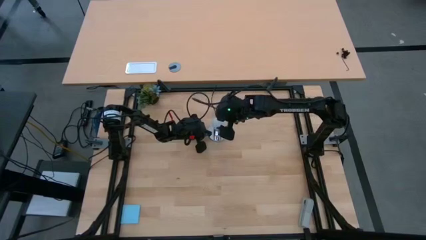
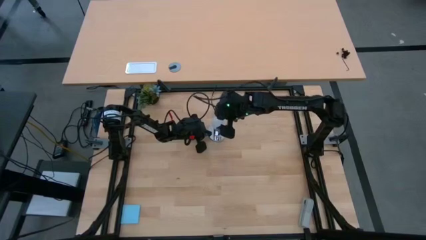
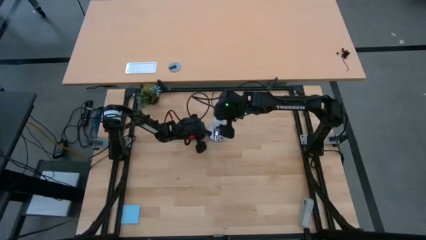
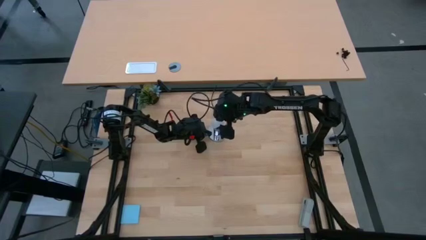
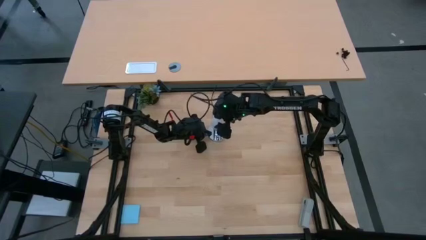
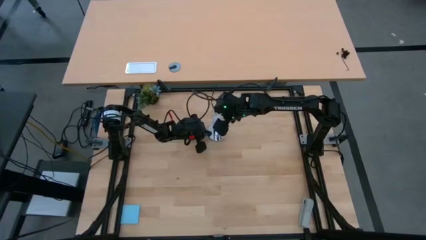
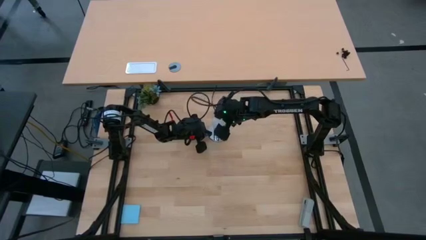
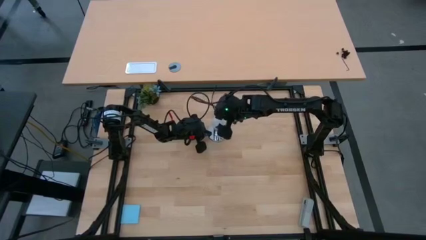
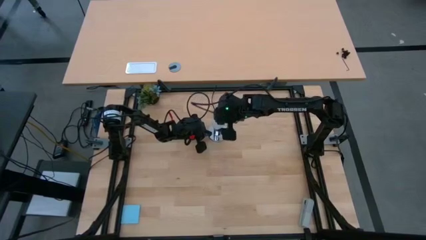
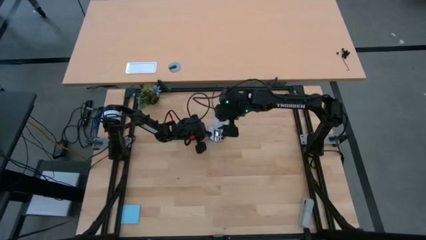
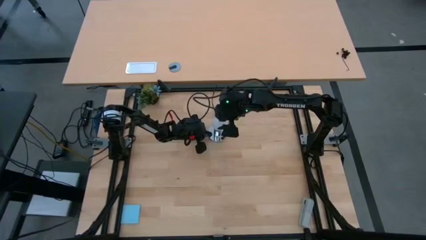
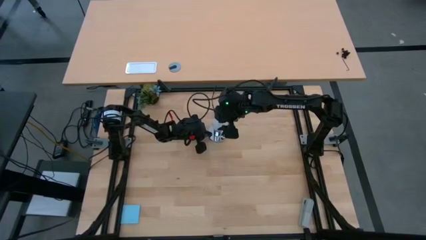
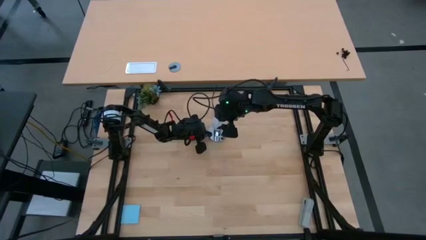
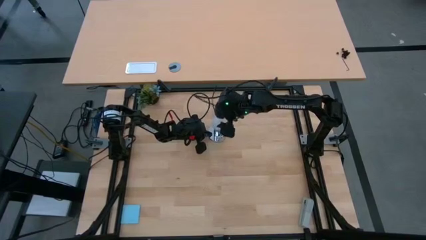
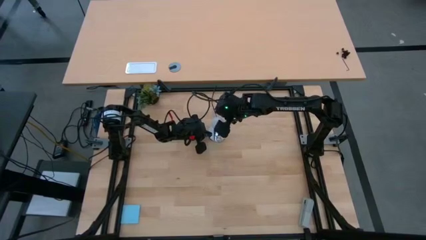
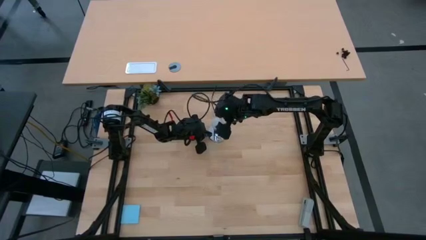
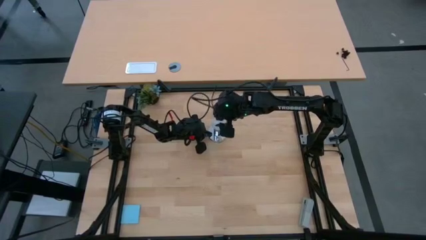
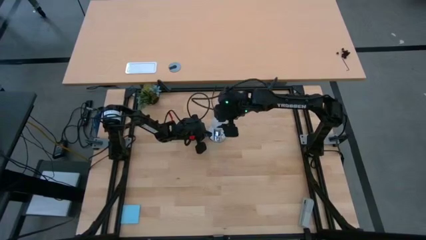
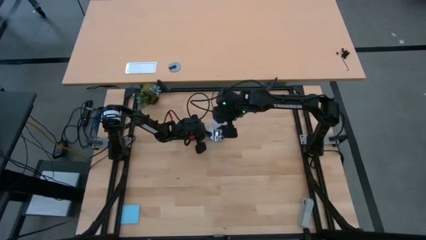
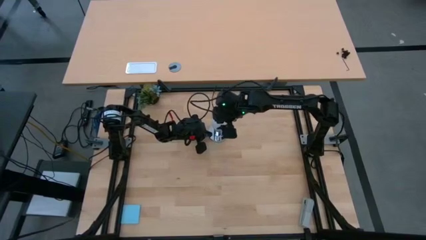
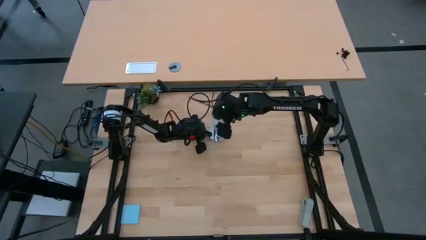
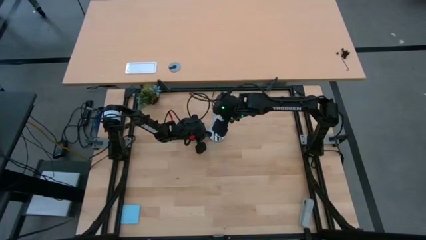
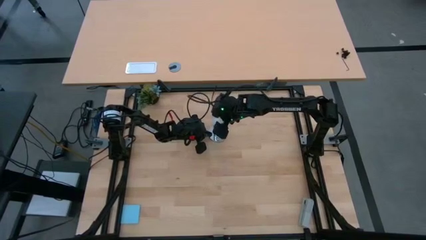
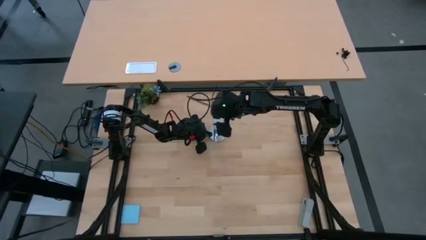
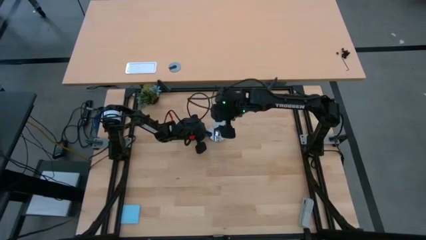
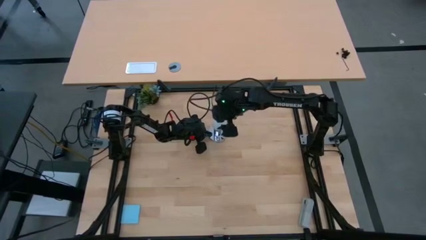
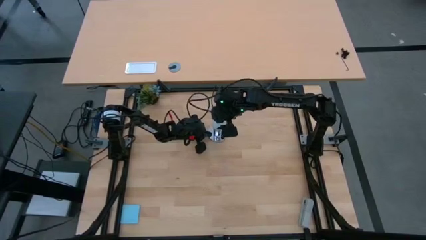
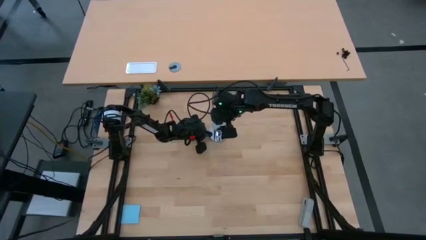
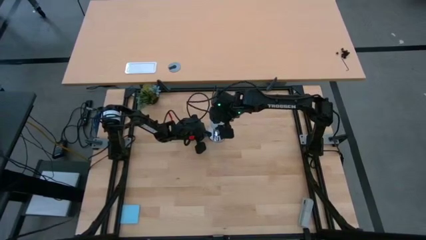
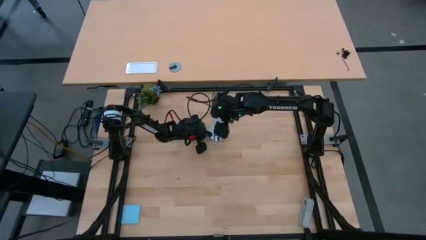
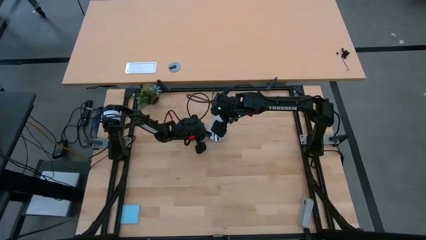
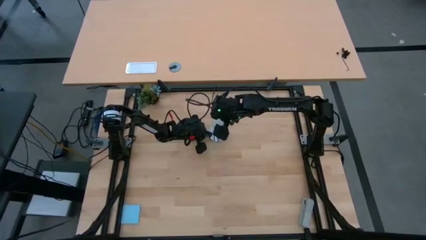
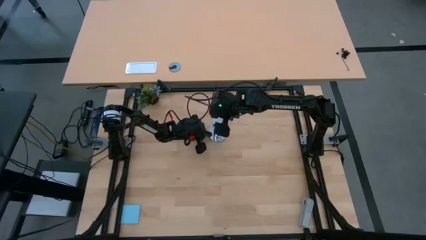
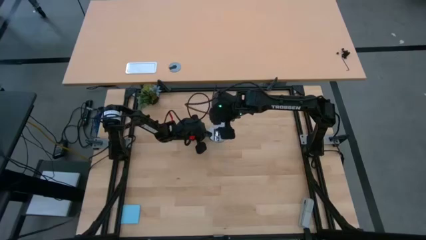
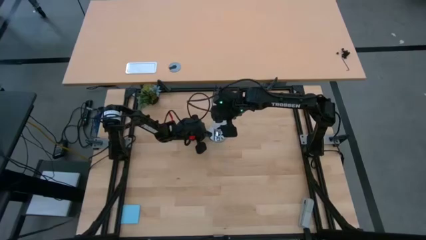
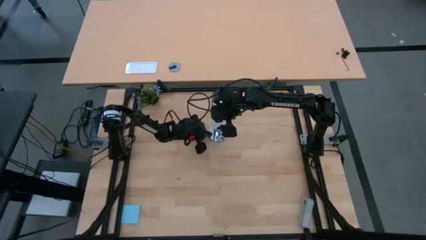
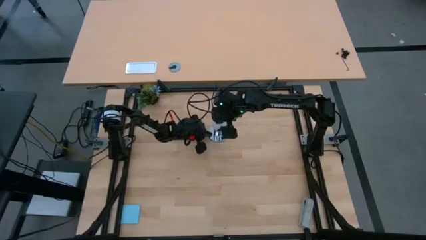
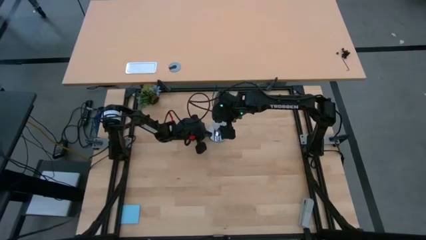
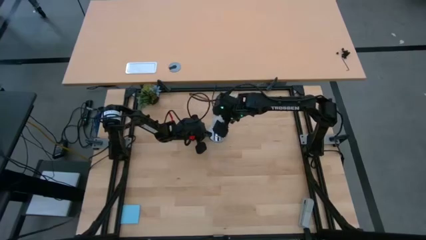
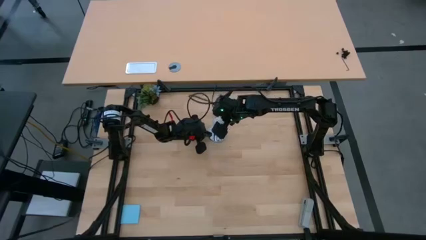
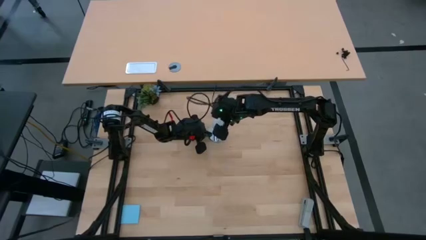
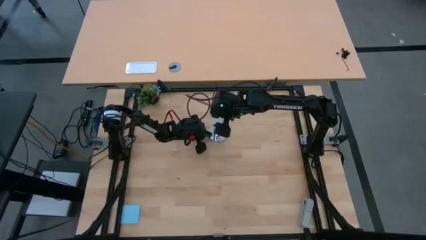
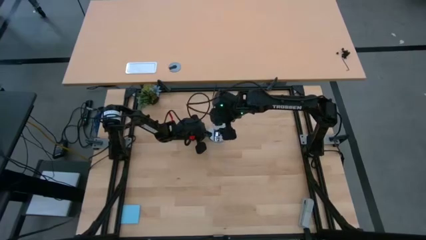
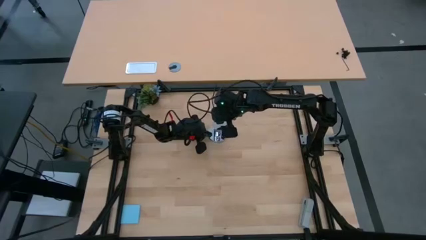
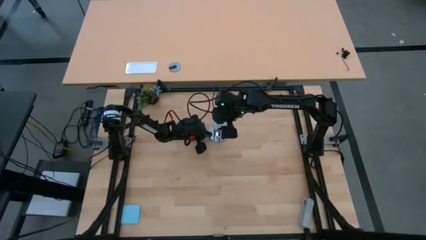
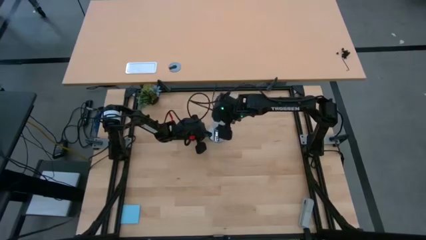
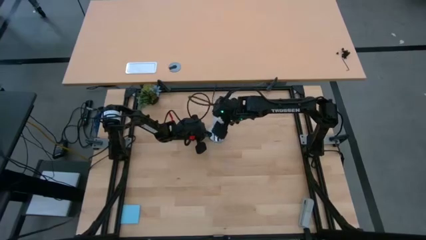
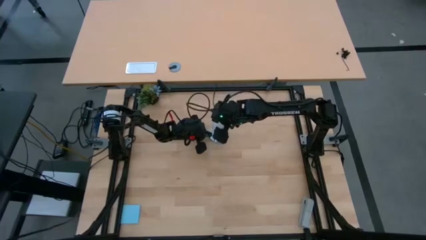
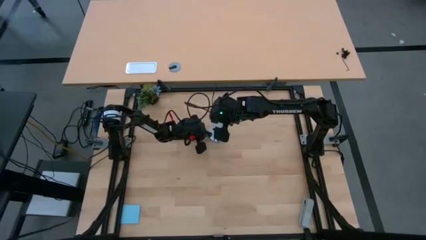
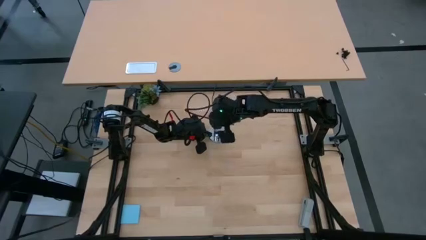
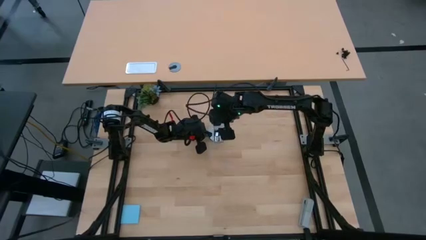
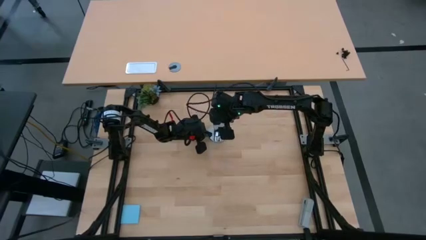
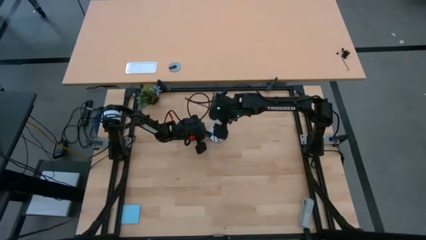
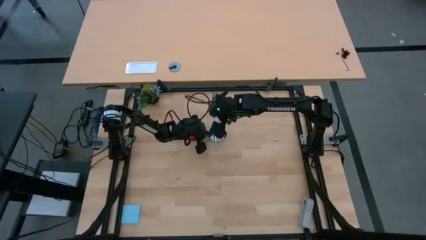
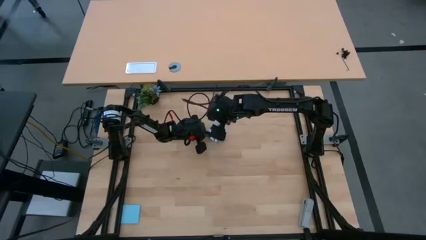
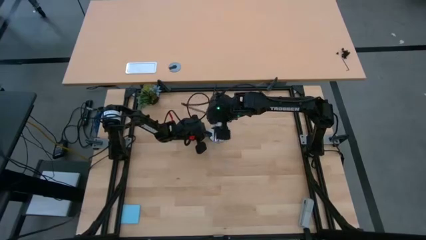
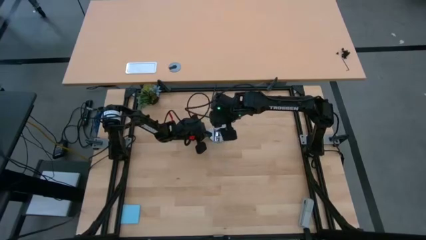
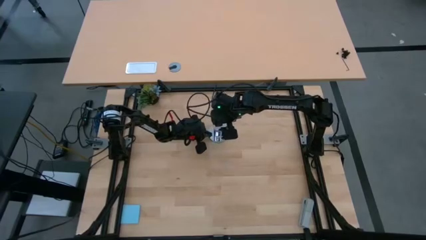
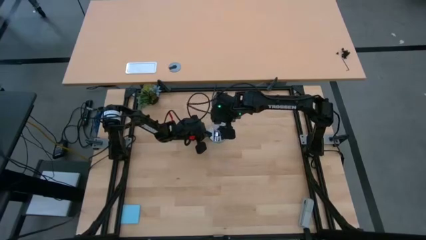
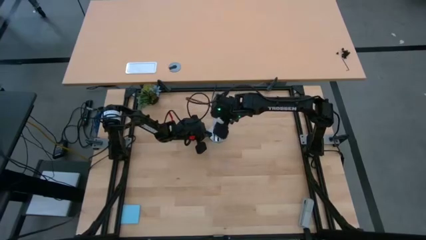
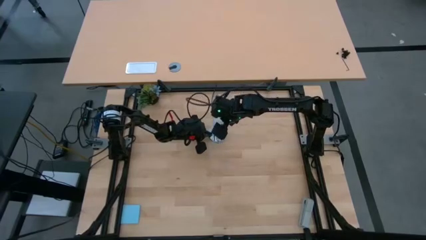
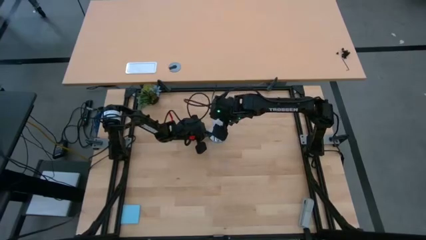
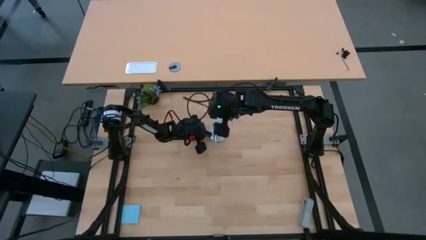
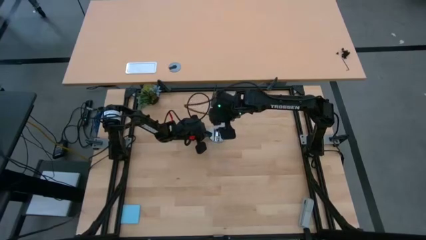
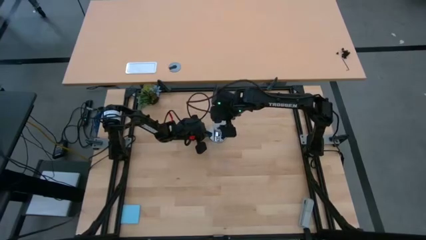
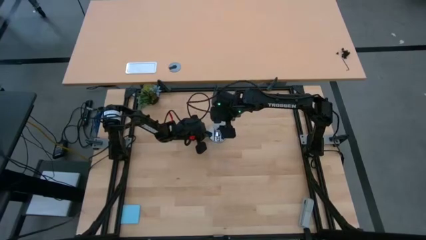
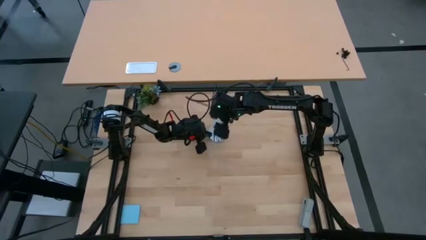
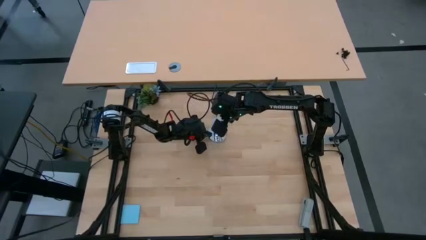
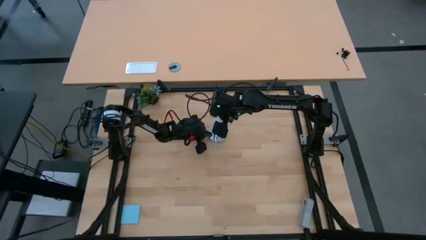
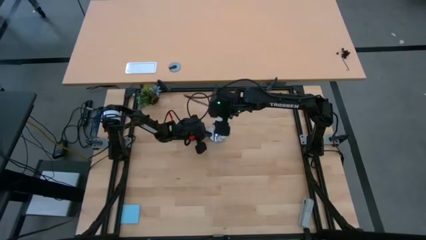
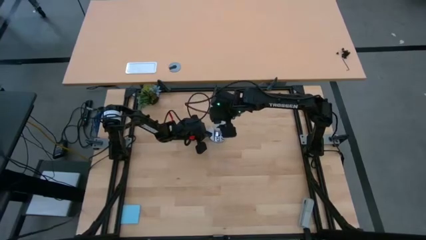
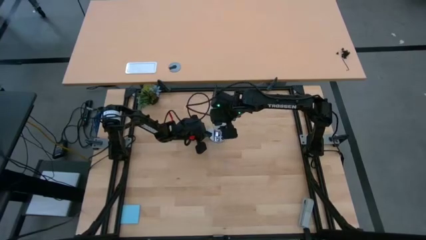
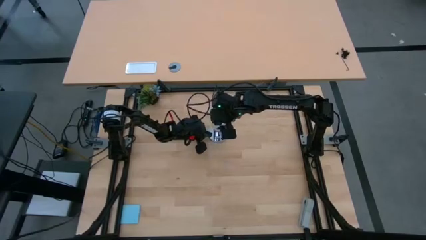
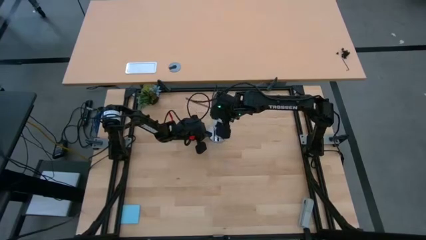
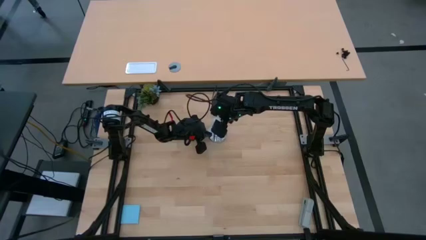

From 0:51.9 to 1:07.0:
Task: Screw lightbulb
Insert the white lightbulb into the silver lamp
